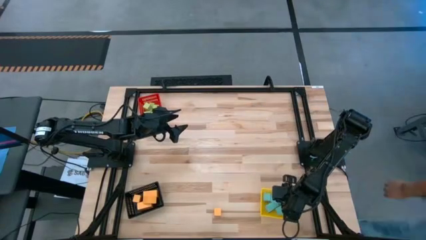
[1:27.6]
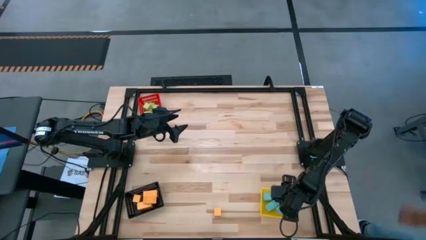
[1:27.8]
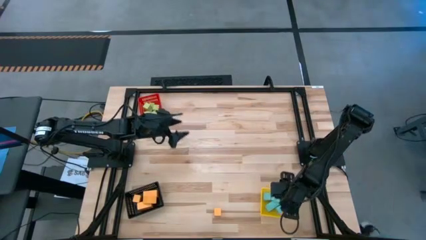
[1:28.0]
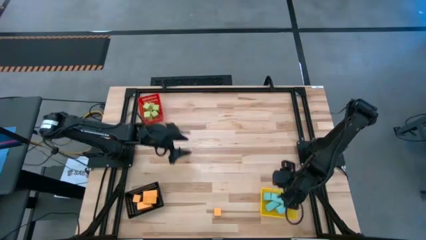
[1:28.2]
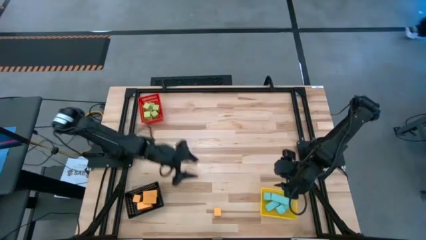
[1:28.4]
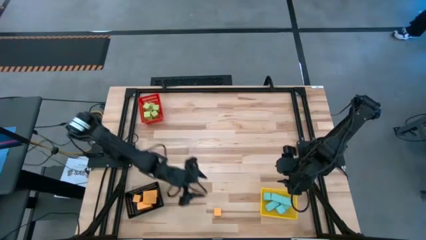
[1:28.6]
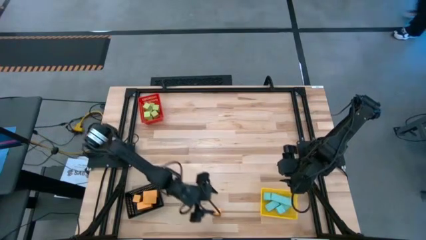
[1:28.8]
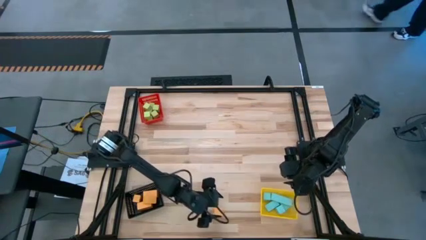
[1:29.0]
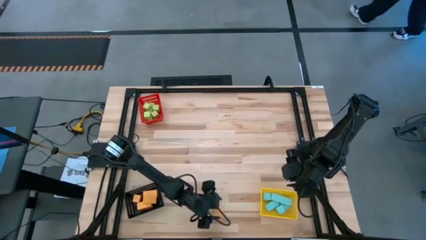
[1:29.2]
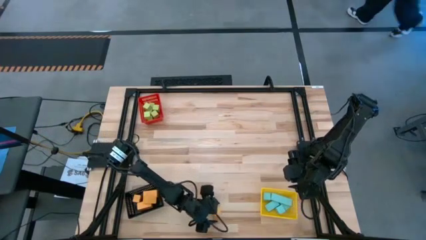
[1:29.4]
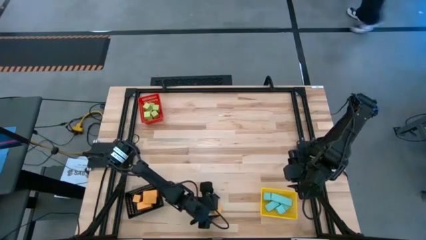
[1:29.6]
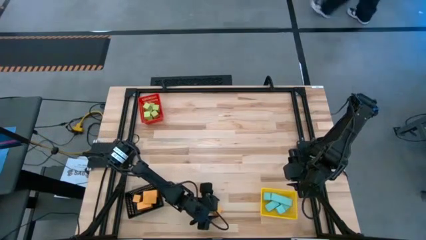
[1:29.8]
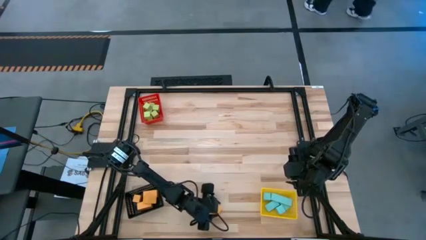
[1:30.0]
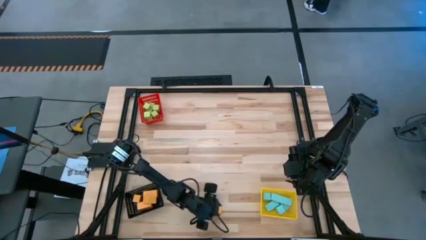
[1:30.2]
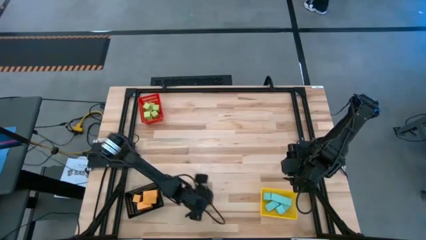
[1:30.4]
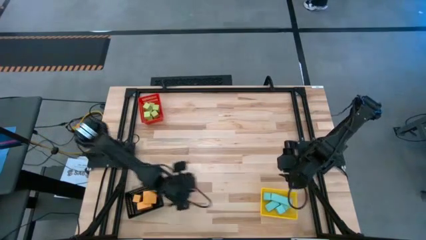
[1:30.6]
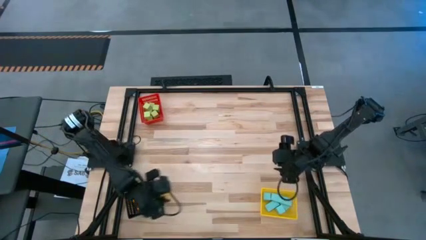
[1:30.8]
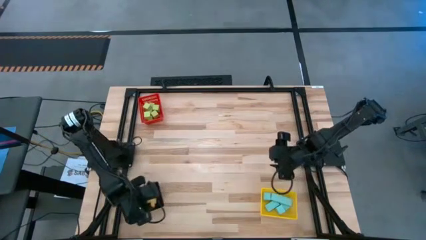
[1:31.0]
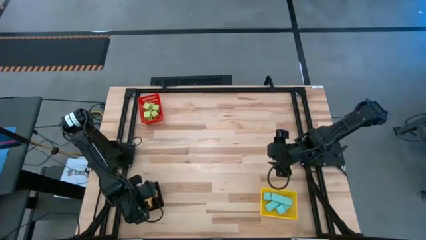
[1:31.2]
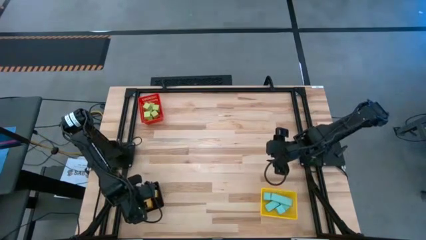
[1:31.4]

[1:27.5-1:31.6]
Task: Sort & place blocks by color
Put the yellow block into the black bin

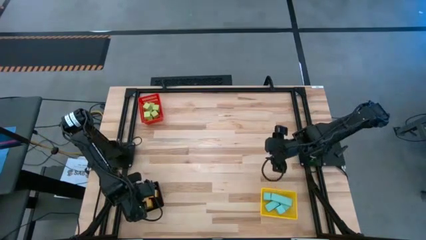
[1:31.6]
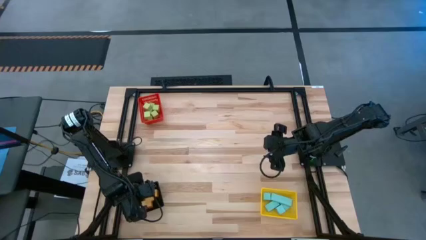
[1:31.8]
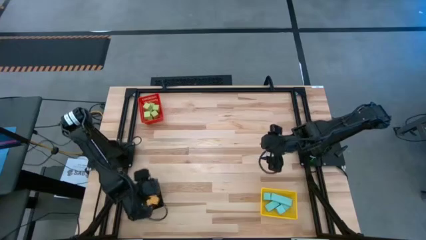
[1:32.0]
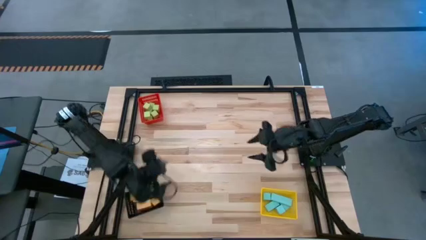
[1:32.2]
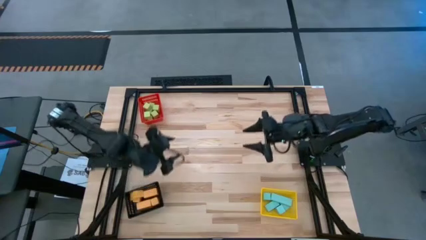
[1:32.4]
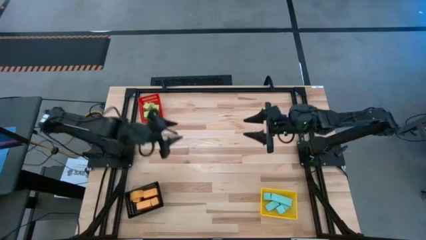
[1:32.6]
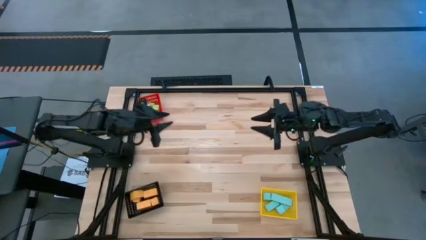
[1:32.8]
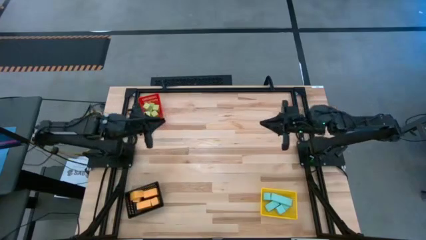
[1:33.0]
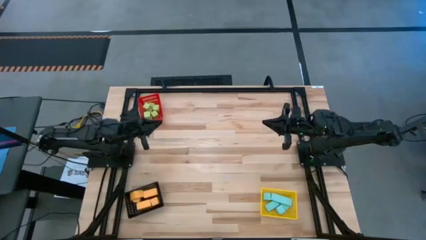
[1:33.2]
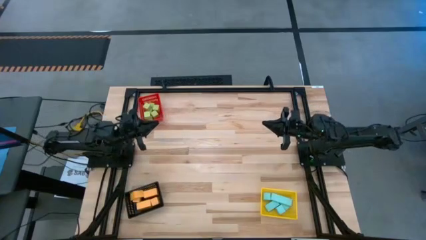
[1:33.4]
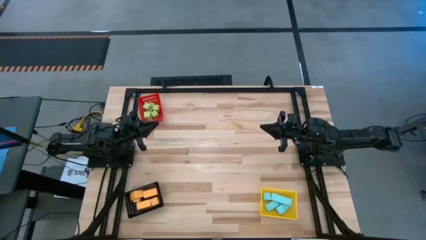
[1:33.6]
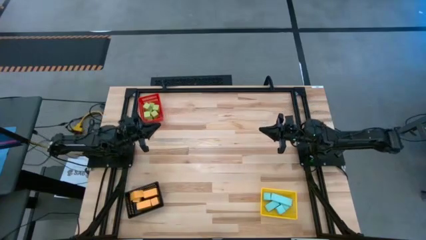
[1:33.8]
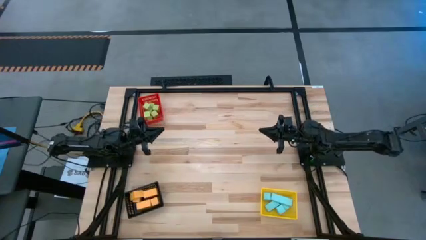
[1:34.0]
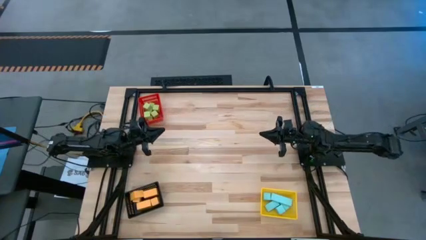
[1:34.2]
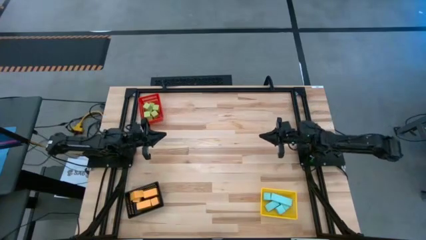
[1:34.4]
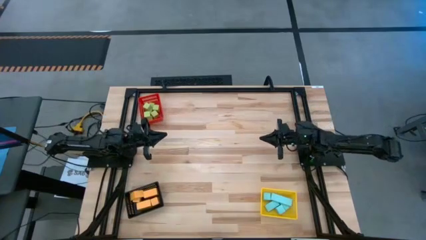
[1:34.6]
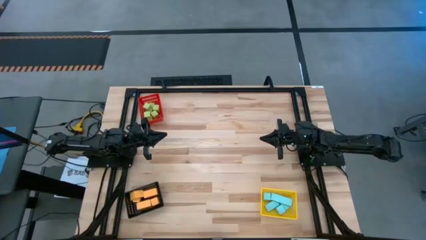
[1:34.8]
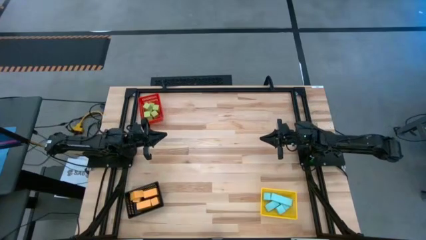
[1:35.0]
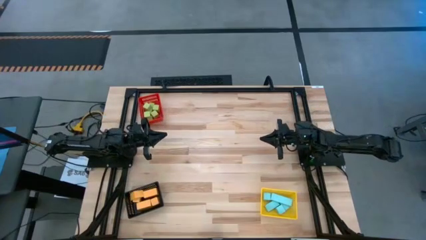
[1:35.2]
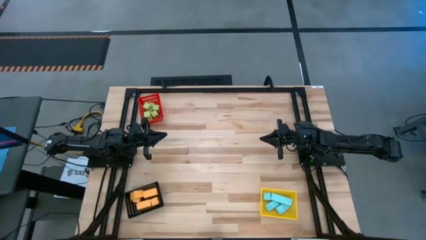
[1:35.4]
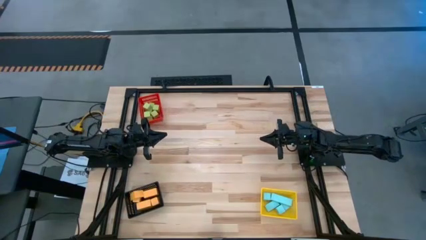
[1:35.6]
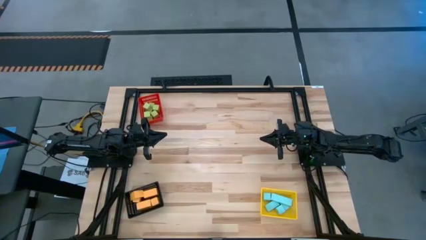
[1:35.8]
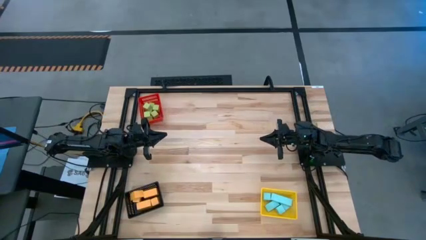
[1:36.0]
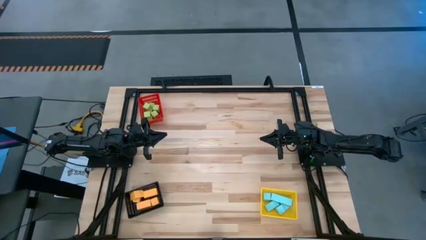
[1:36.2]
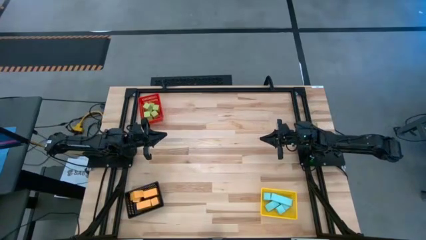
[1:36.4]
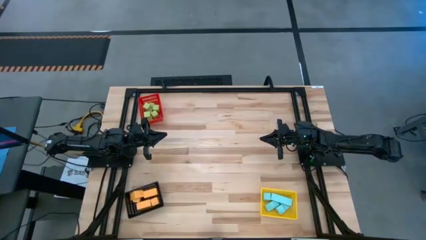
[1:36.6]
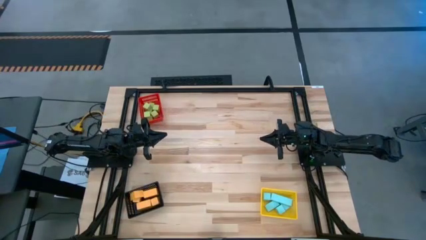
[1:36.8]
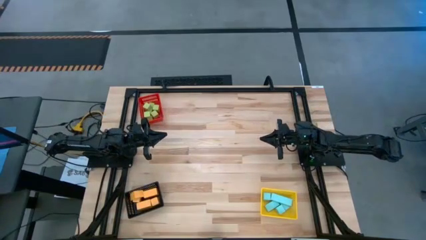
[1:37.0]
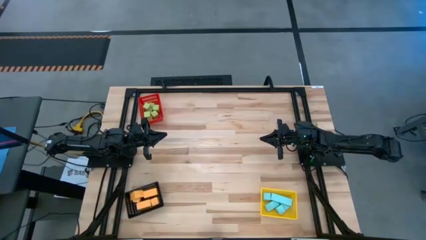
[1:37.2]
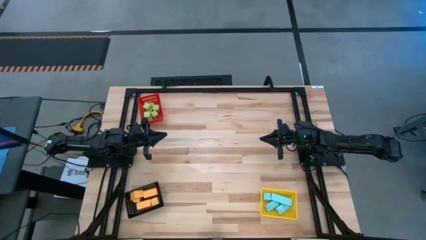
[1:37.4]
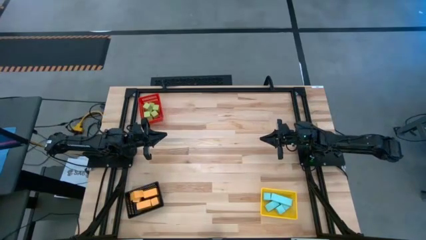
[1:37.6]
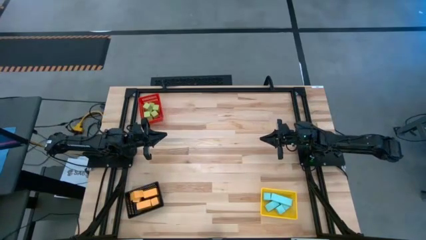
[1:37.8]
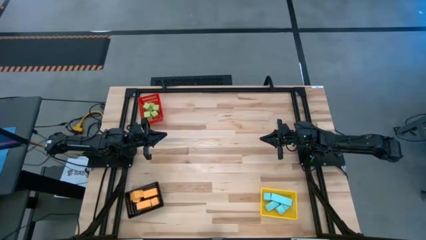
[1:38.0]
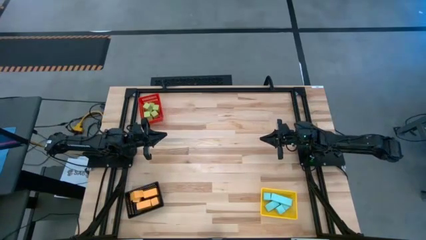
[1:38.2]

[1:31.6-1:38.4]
Return to Home Position

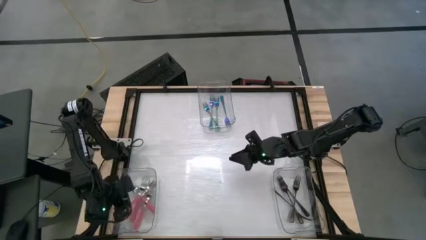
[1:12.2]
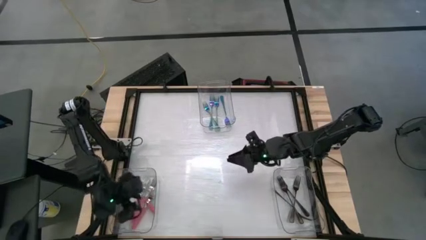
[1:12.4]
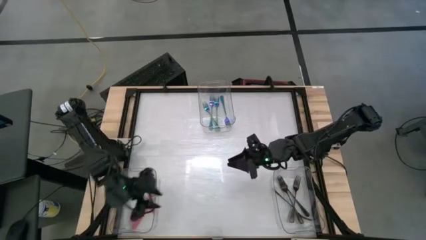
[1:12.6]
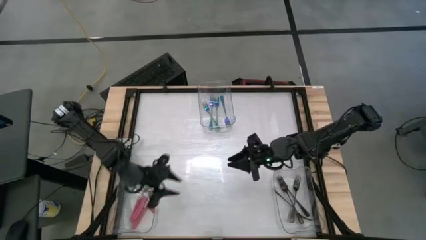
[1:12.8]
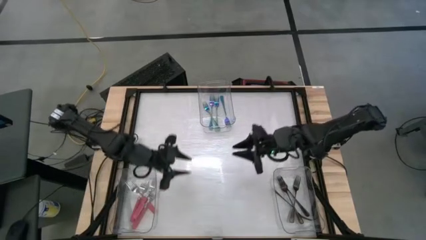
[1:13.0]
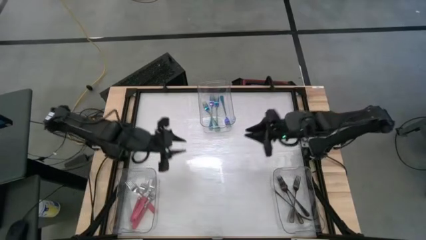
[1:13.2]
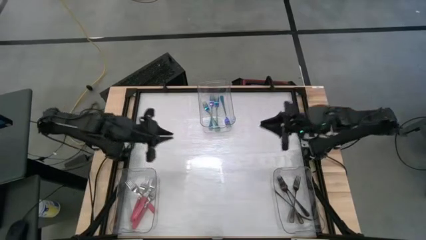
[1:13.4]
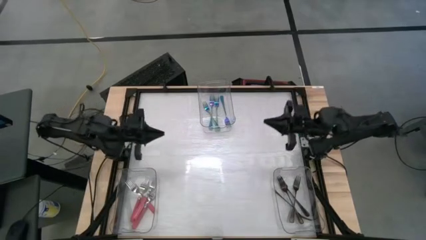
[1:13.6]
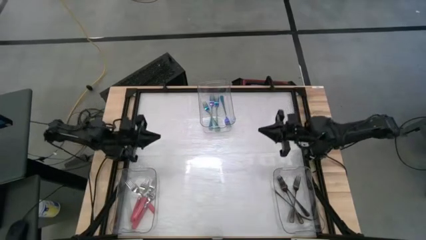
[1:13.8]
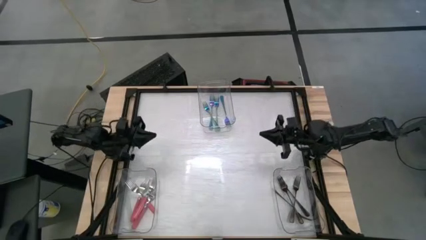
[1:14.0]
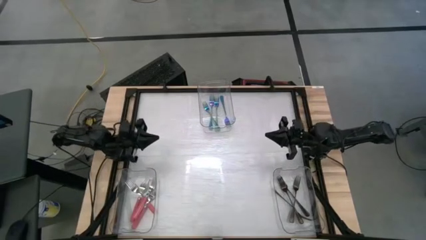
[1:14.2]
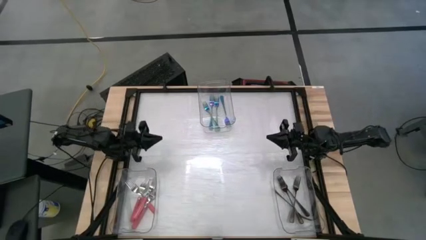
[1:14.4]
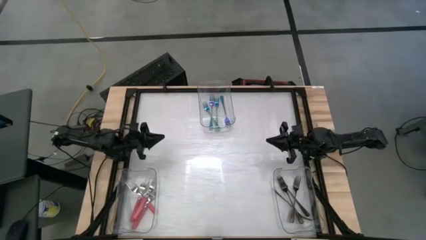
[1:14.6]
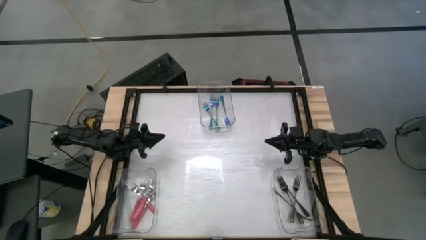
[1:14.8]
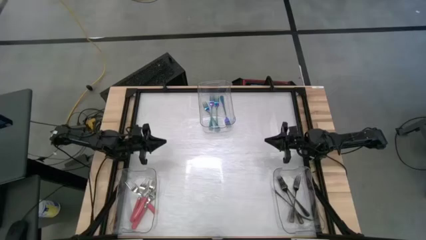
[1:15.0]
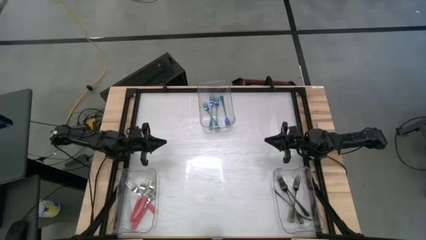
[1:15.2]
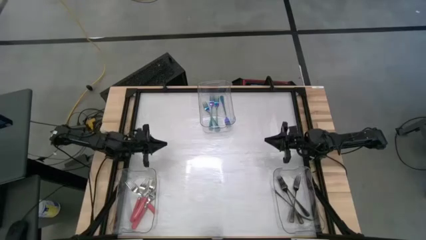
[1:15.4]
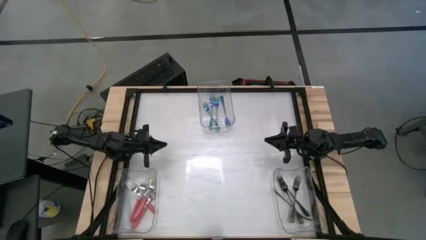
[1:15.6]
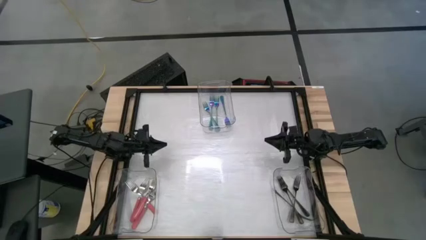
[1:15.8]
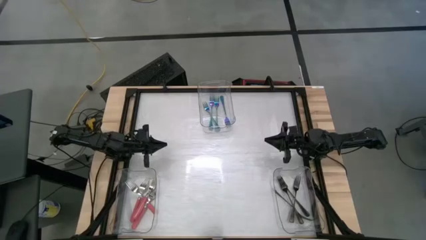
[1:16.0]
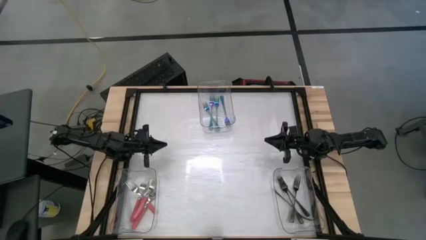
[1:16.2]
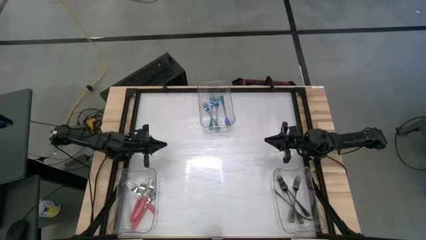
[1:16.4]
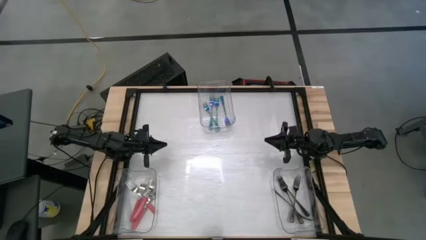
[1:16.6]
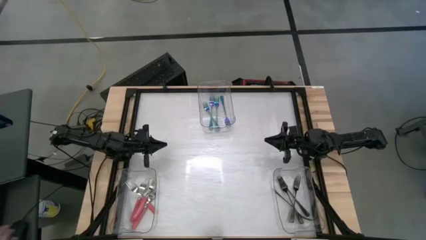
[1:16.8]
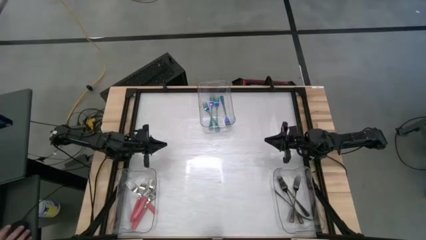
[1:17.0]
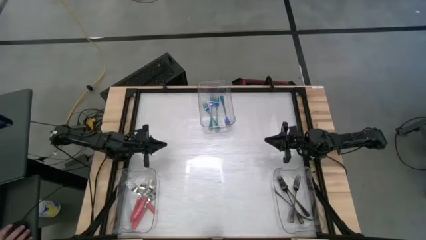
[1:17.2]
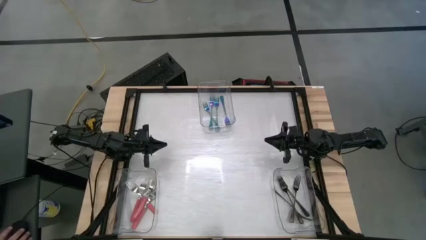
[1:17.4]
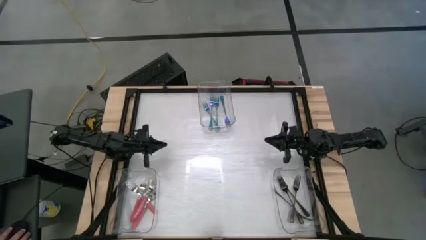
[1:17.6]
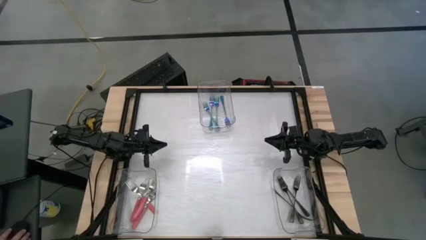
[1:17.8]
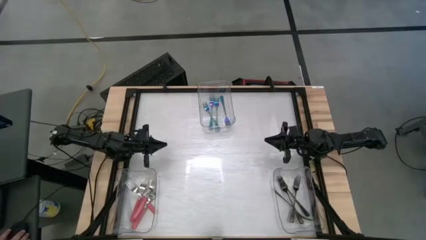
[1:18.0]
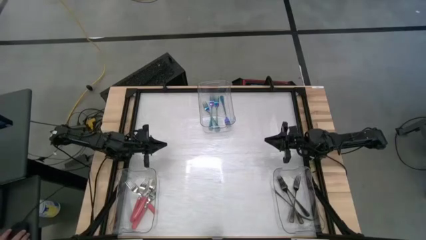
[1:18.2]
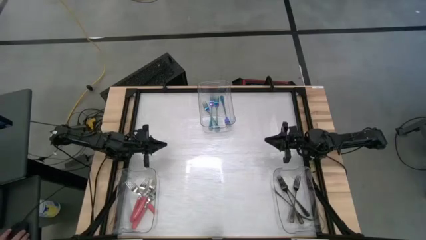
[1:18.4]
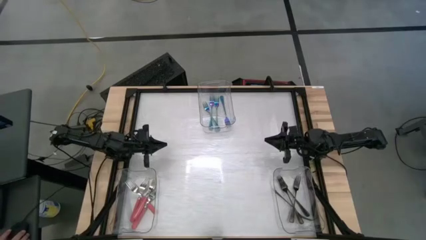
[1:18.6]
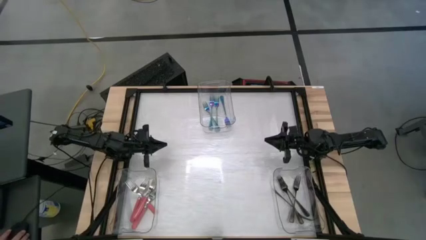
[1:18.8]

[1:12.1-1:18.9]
Task: Sort silverware by color (type)
Return to Home Position
